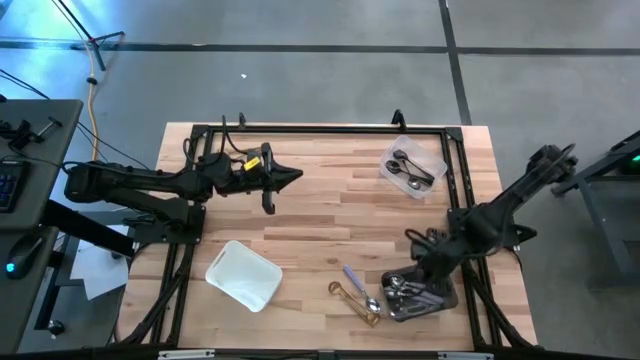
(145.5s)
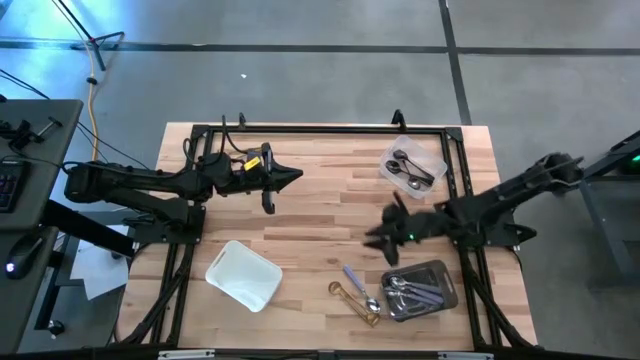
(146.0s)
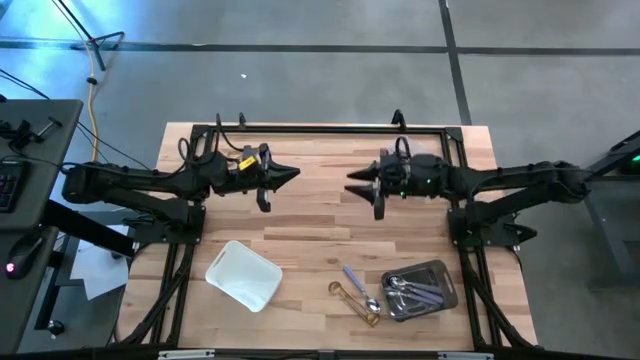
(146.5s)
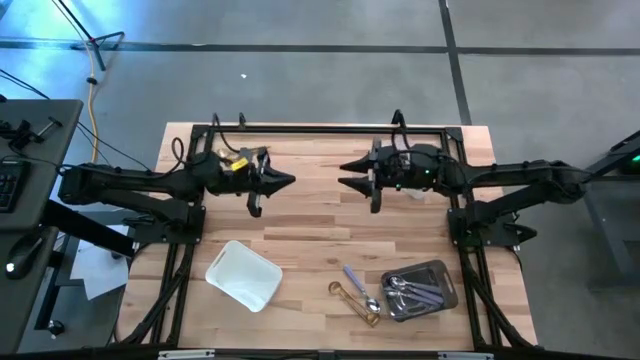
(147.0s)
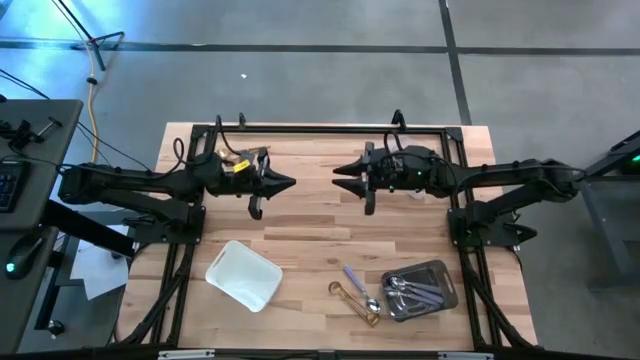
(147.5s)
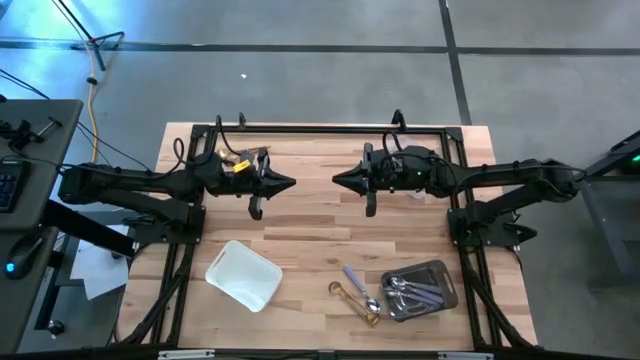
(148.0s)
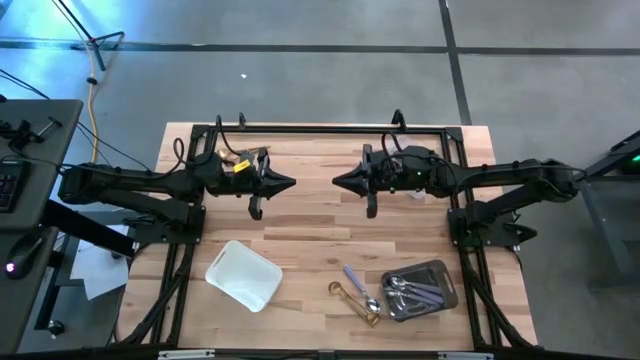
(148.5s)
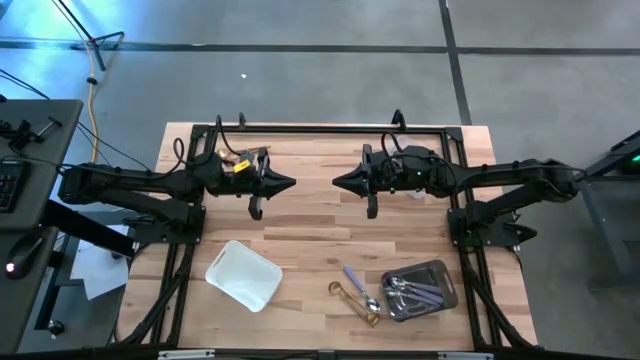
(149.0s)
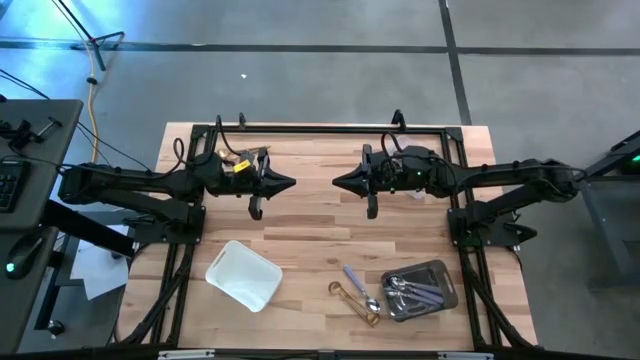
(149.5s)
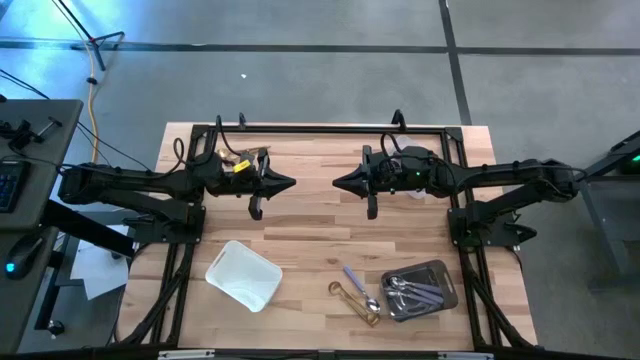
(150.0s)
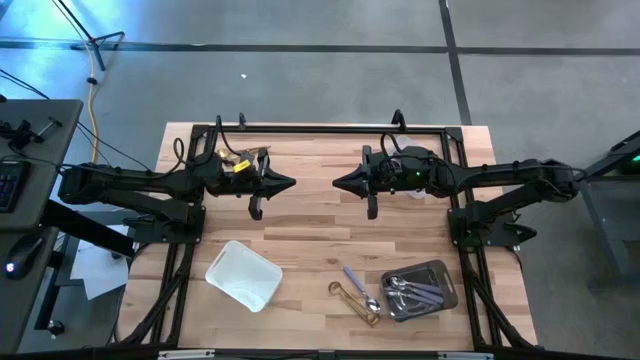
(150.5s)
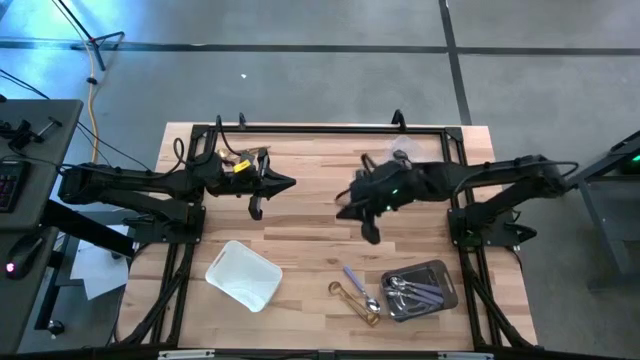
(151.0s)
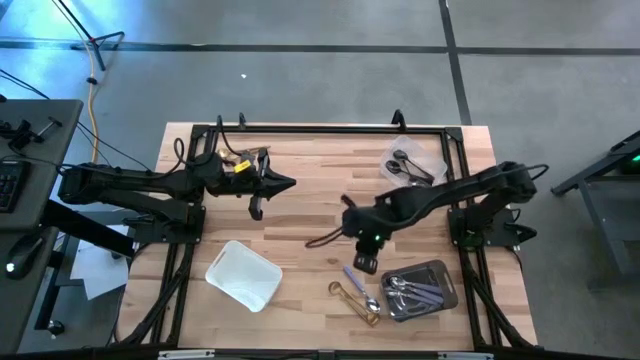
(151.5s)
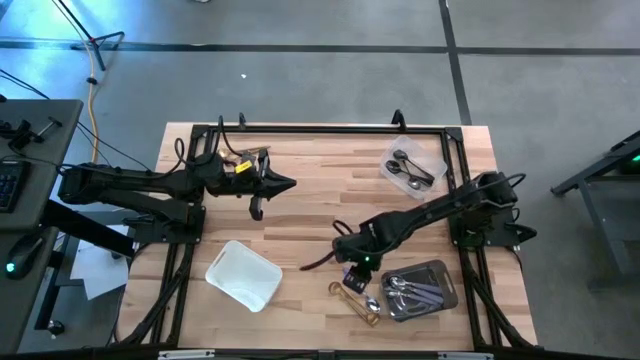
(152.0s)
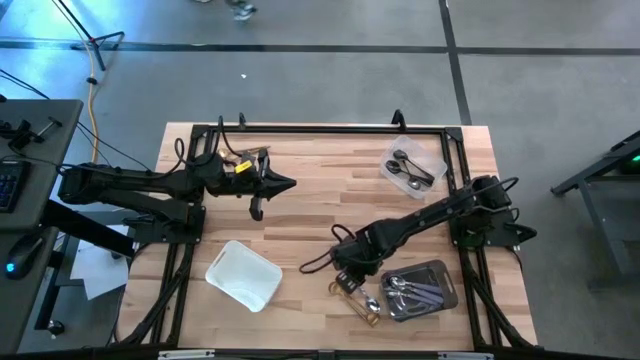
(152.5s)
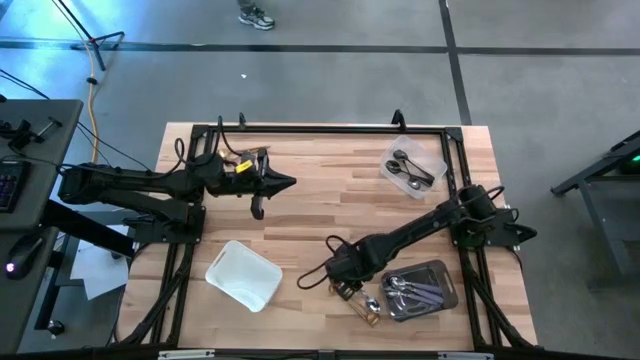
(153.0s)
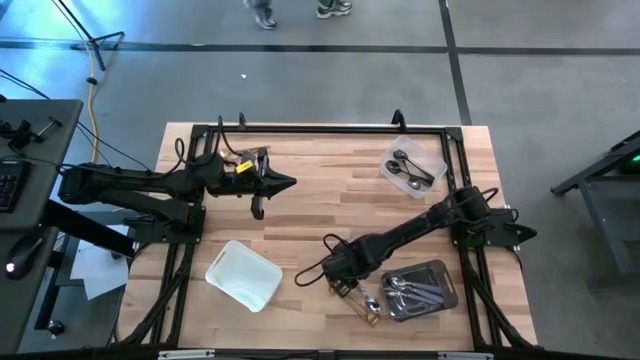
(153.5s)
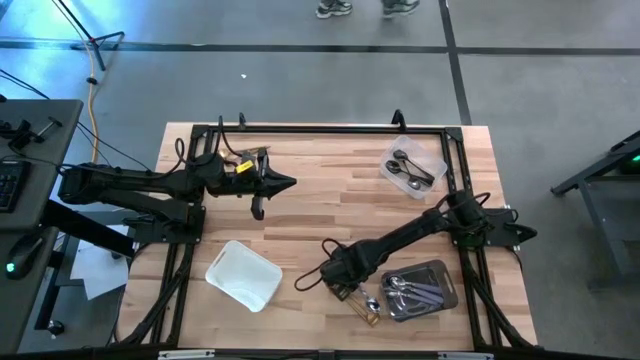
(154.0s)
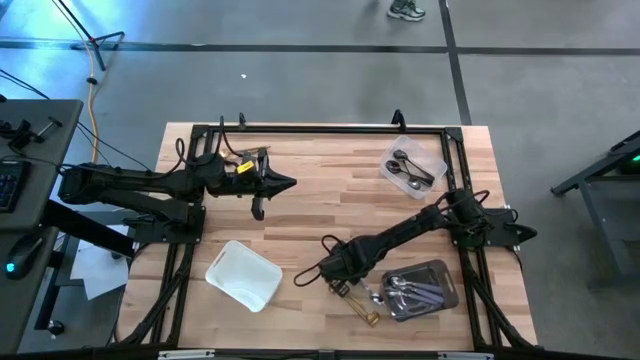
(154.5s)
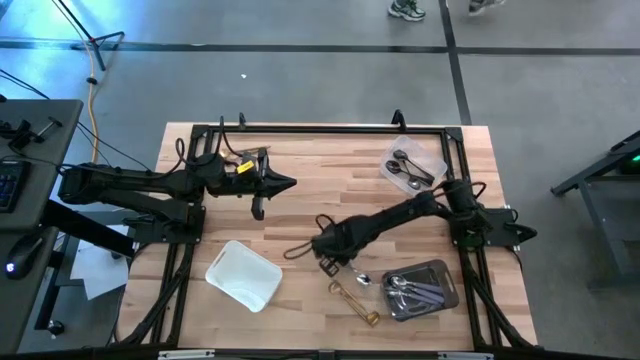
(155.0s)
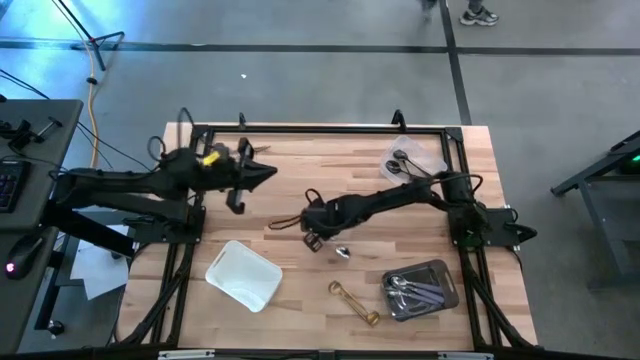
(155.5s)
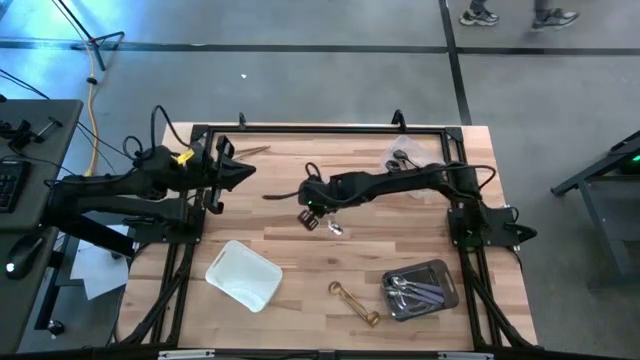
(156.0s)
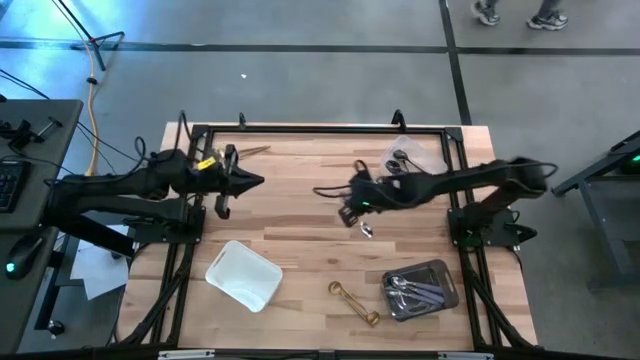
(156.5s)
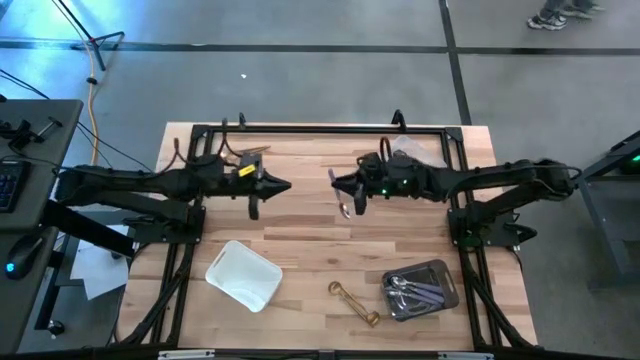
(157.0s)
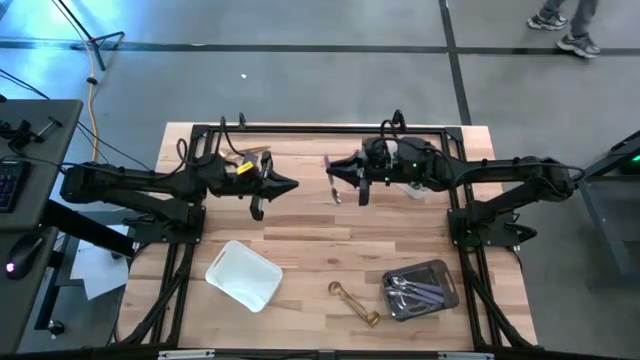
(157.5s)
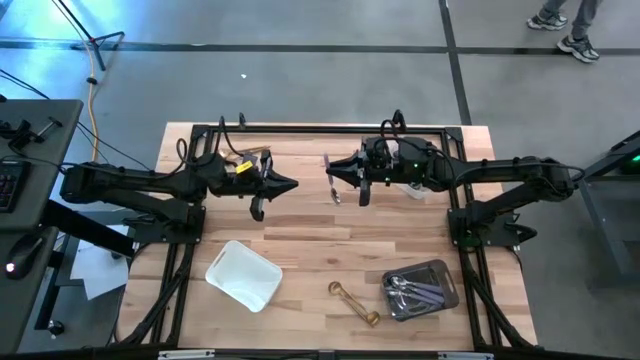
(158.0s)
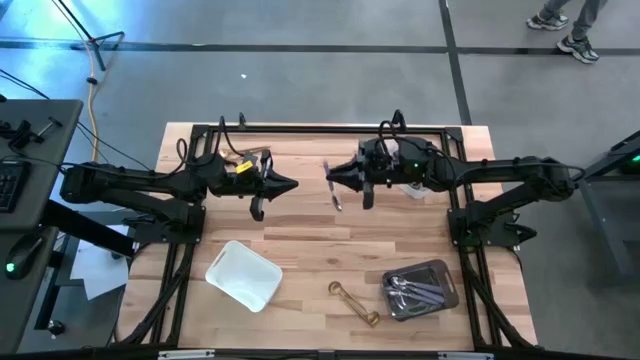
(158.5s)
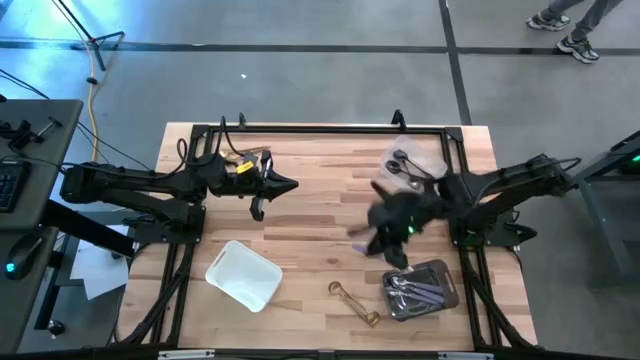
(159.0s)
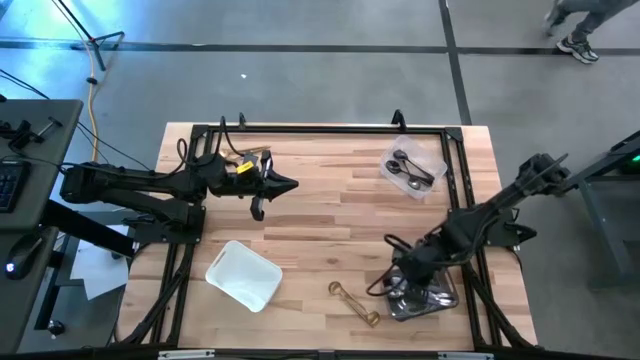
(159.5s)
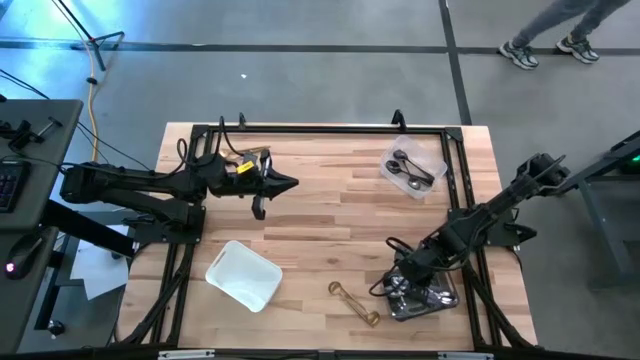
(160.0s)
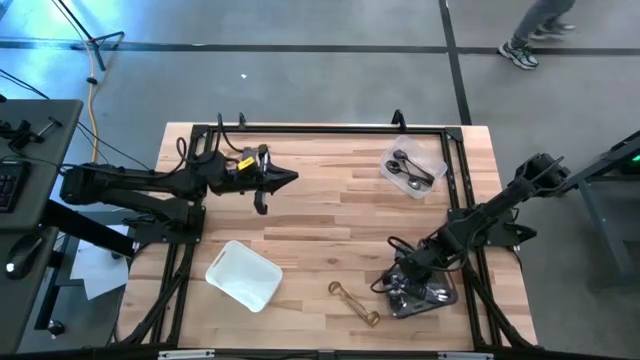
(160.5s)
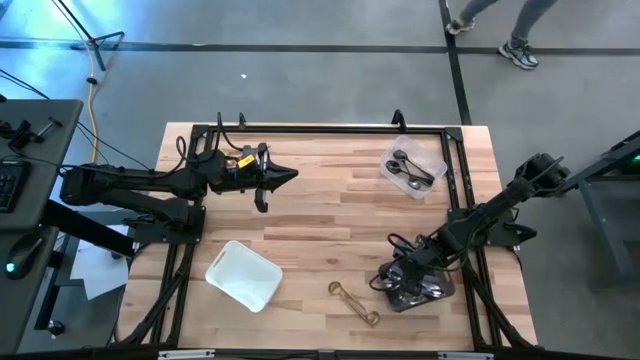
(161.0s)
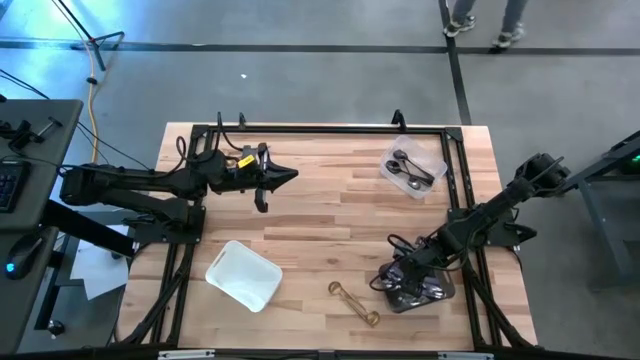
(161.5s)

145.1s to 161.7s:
Task: Sort silverware by color (type)
Put the violet spoon into the black bin

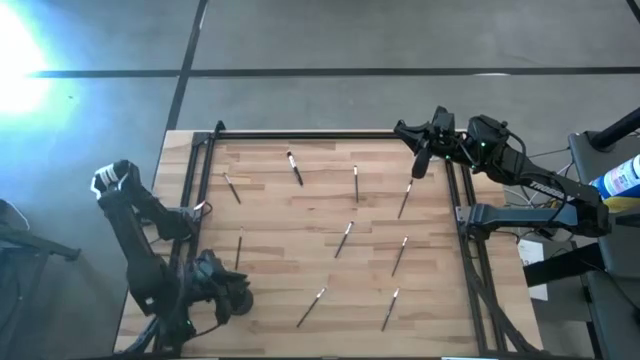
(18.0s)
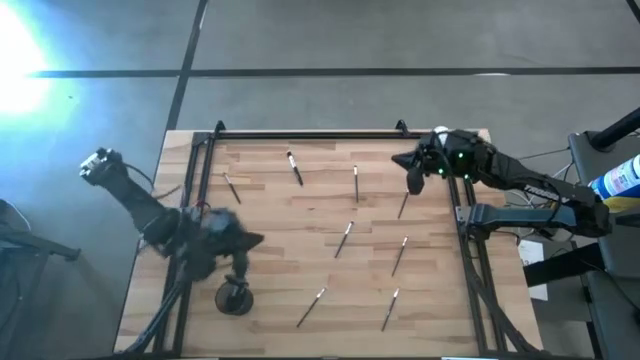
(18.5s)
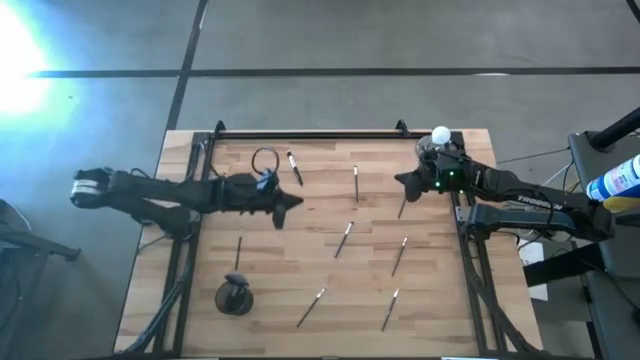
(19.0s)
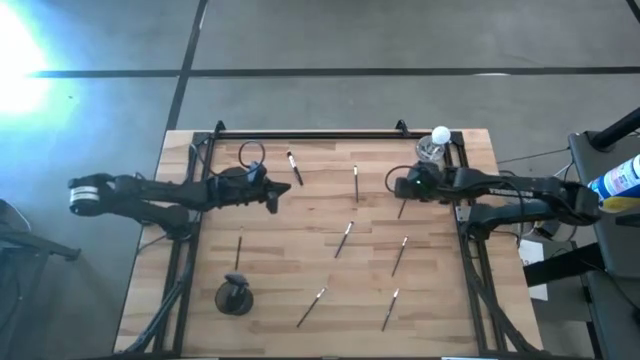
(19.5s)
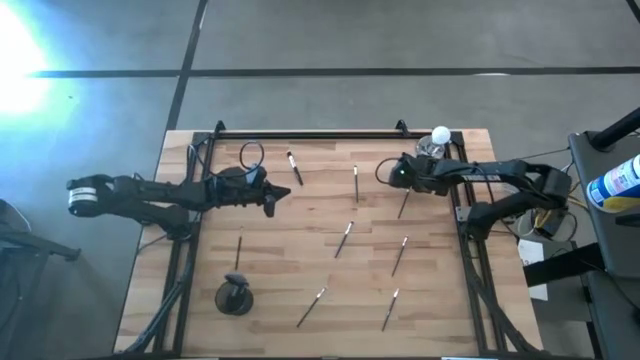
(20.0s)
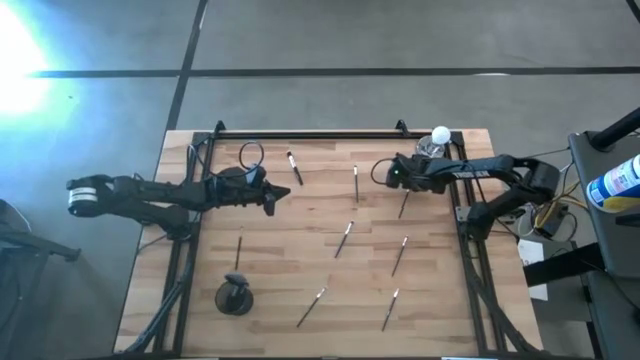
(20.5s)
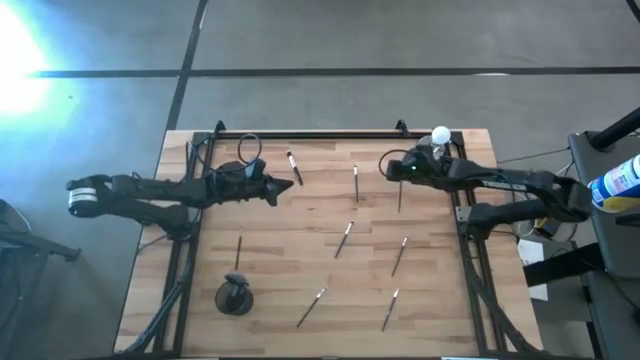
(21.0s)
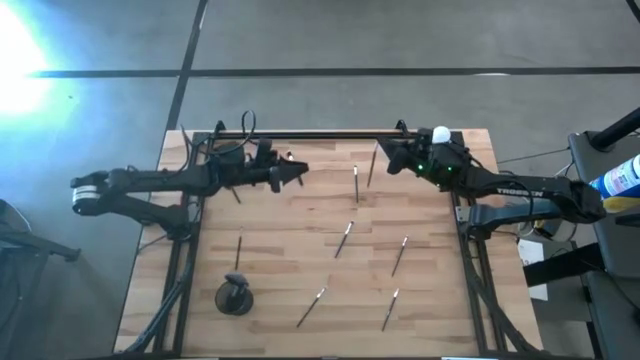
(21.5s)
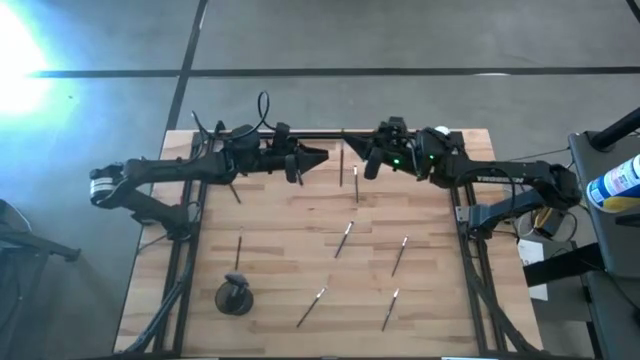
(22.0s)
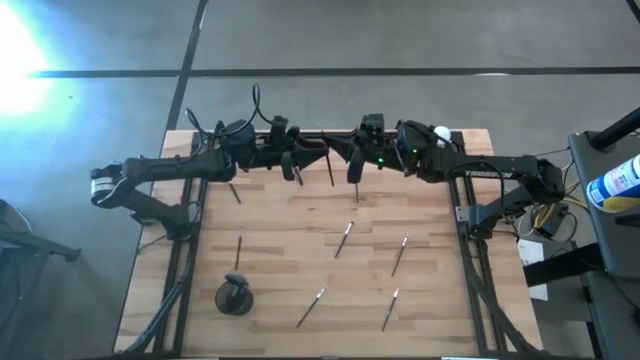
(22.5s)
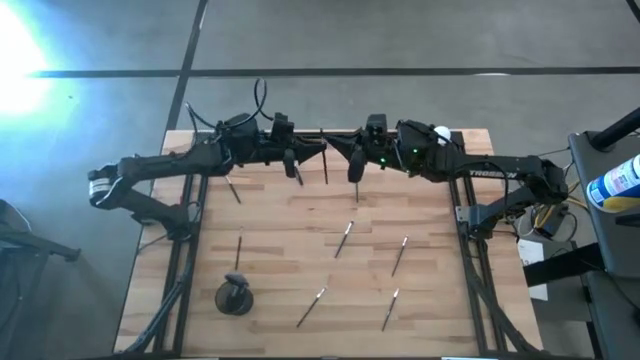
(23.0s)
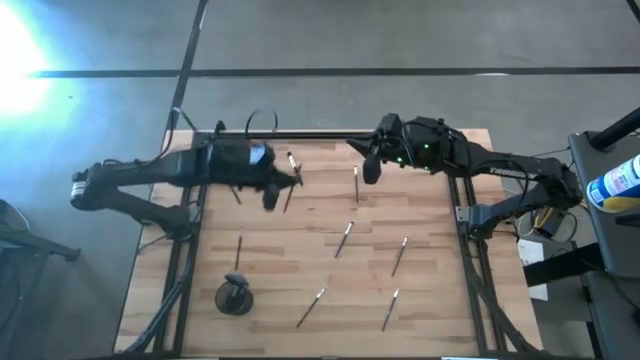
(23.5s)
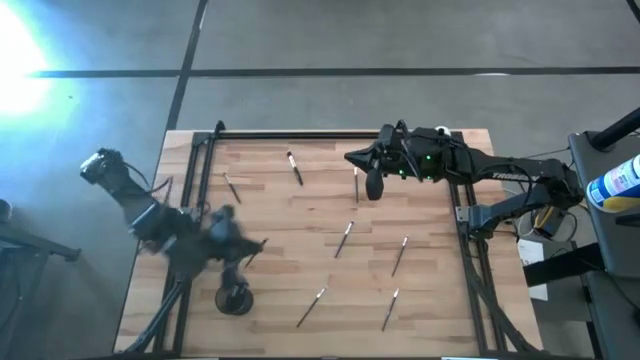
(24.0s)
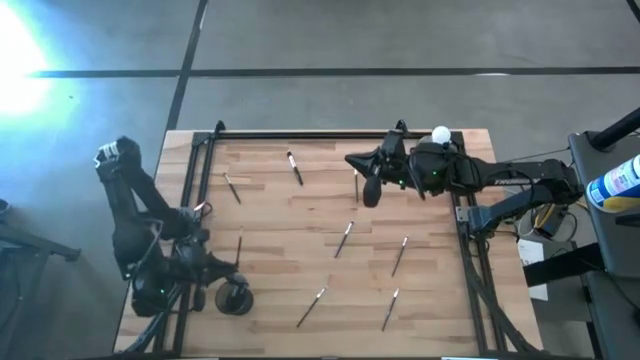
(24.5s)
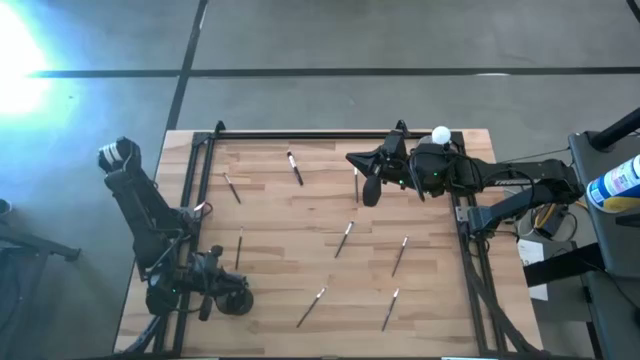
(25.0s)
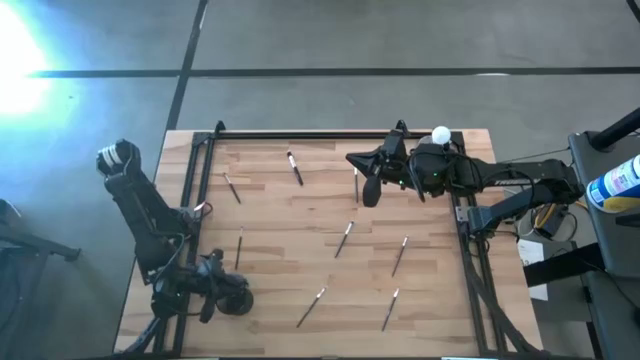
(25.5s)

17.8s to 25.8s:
Task: Pick & Place Makeup Brushes
Put the eyebrow brush into the holder
